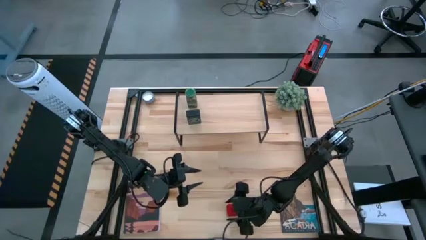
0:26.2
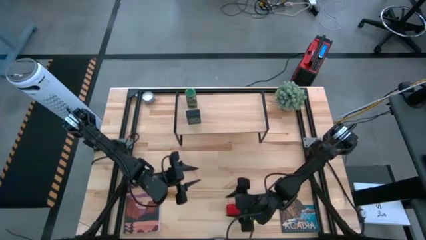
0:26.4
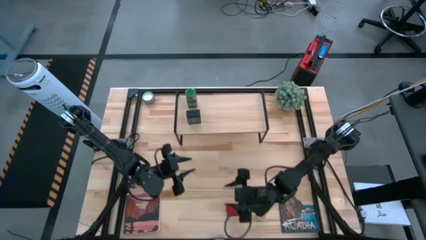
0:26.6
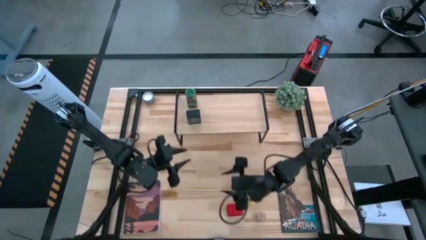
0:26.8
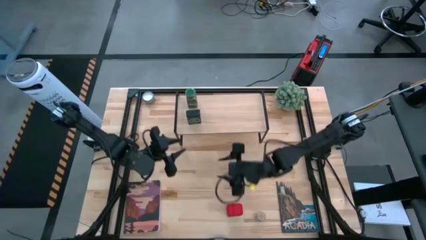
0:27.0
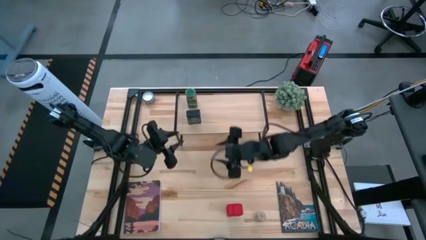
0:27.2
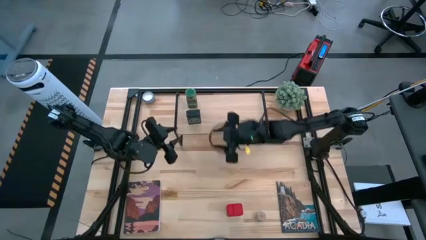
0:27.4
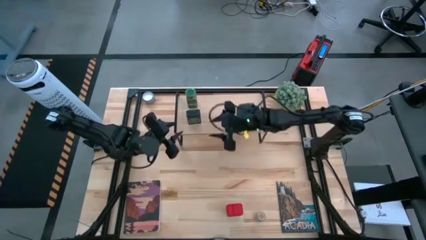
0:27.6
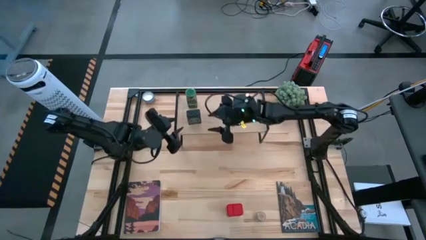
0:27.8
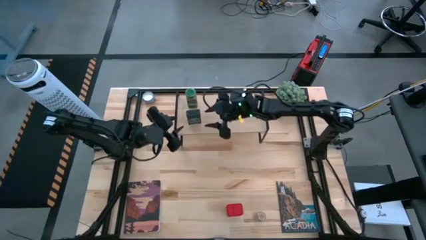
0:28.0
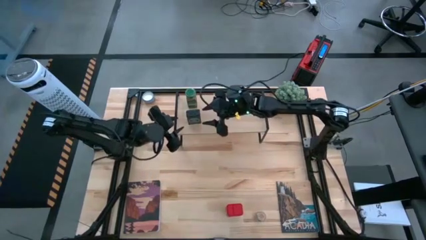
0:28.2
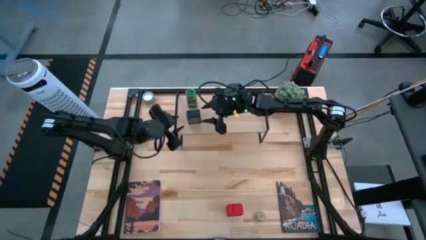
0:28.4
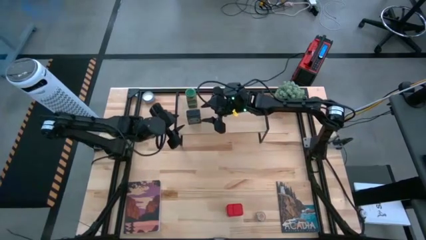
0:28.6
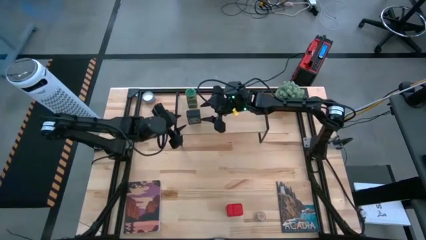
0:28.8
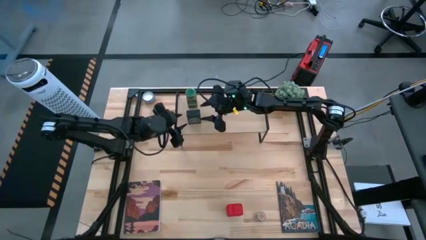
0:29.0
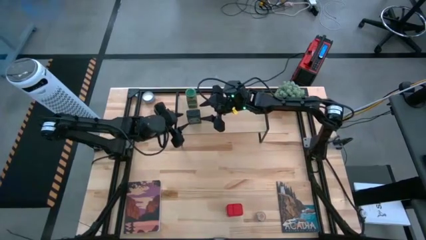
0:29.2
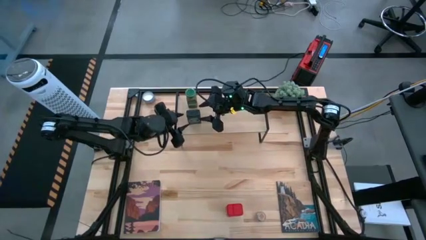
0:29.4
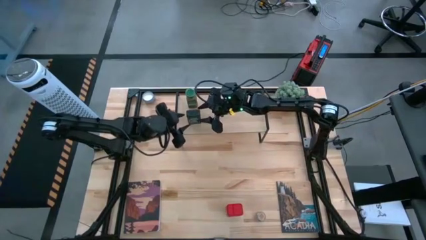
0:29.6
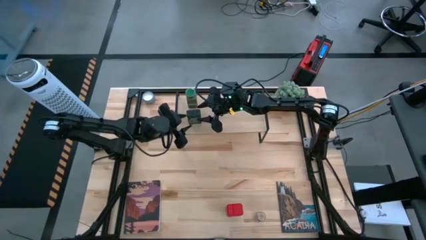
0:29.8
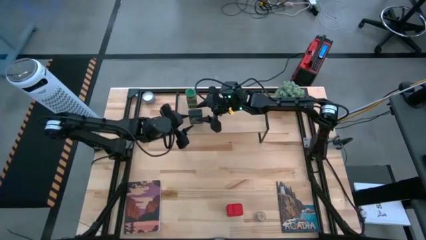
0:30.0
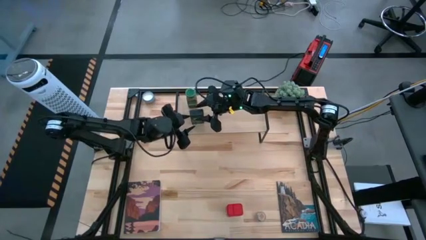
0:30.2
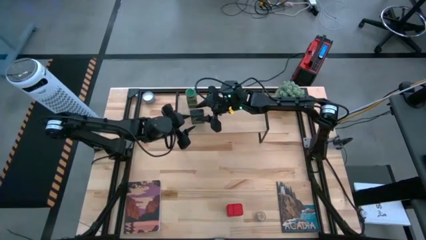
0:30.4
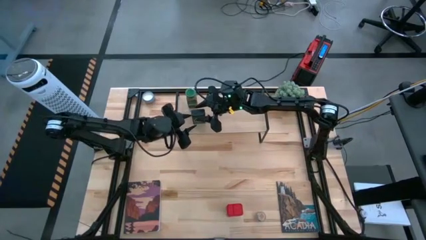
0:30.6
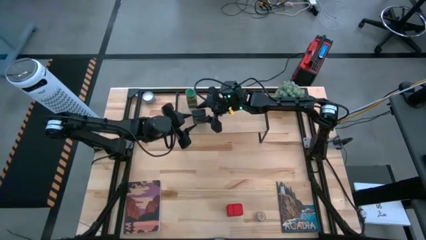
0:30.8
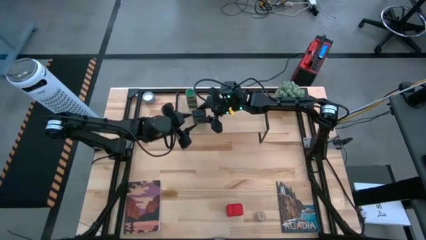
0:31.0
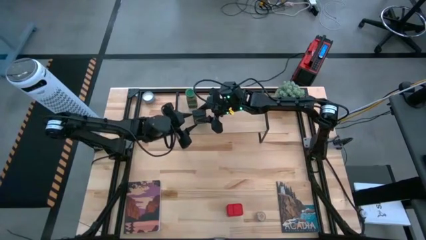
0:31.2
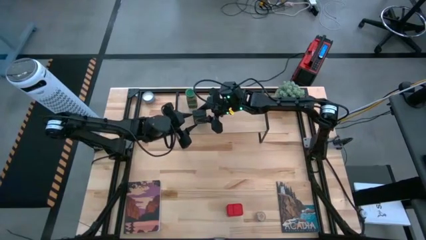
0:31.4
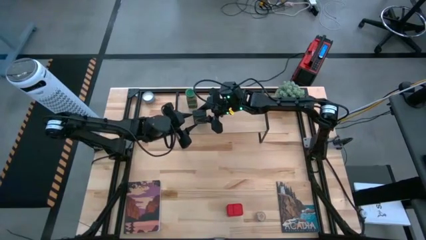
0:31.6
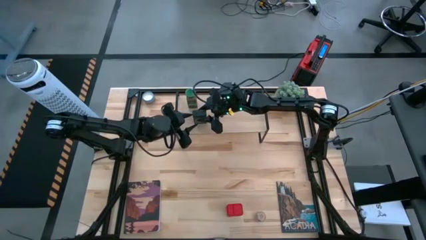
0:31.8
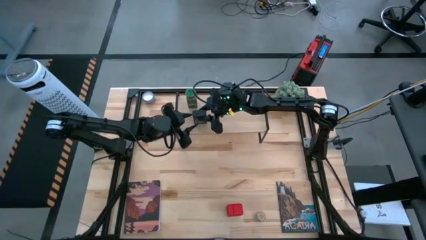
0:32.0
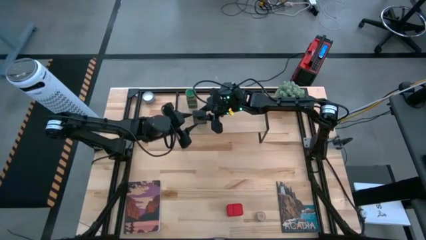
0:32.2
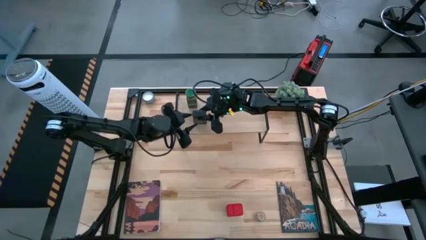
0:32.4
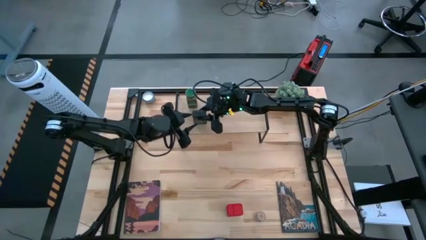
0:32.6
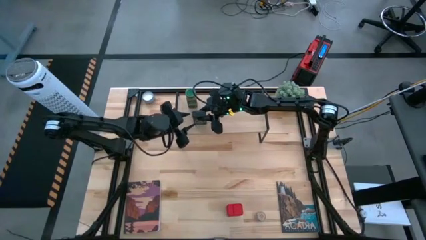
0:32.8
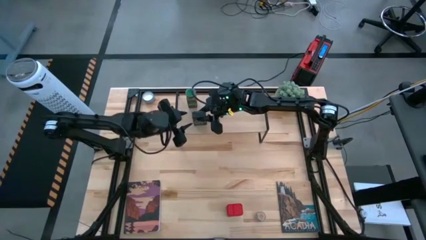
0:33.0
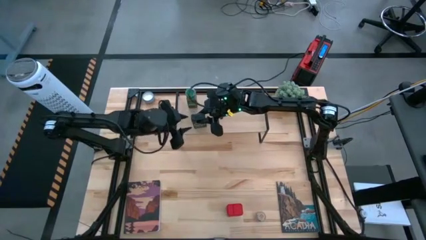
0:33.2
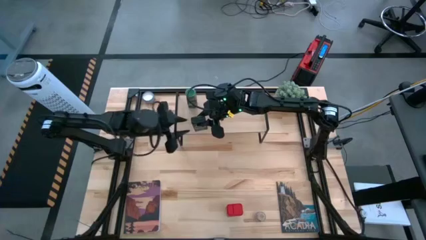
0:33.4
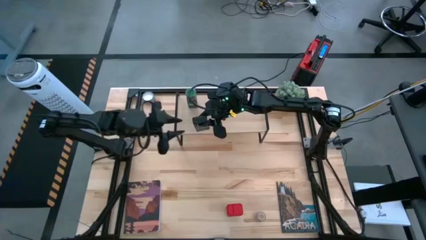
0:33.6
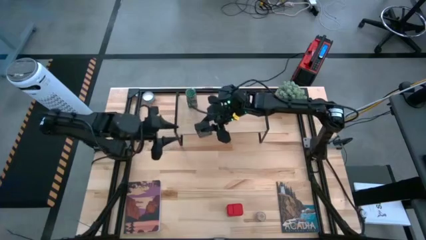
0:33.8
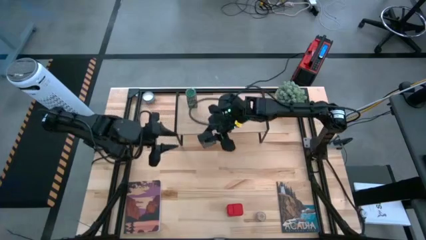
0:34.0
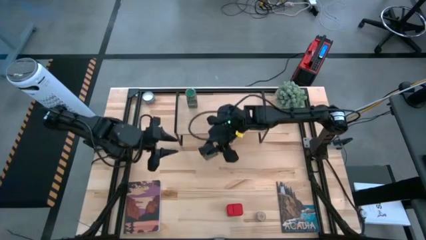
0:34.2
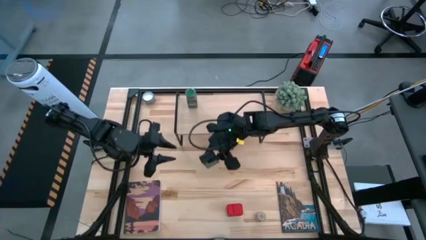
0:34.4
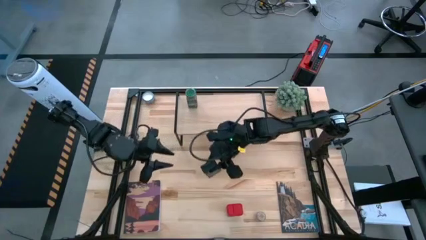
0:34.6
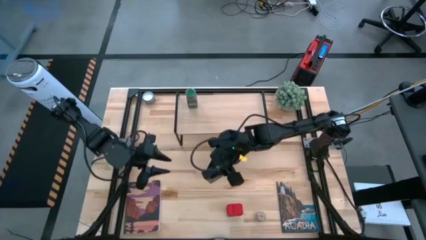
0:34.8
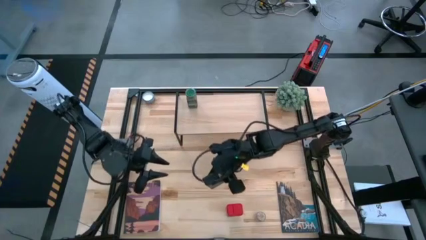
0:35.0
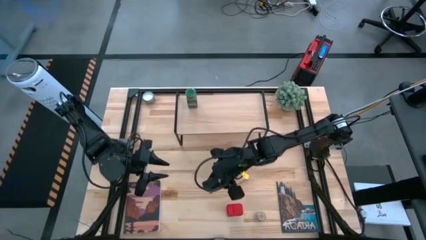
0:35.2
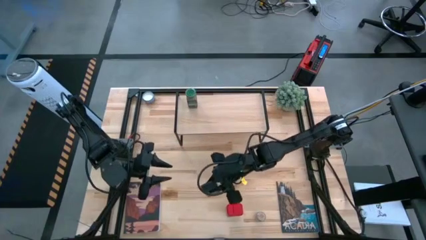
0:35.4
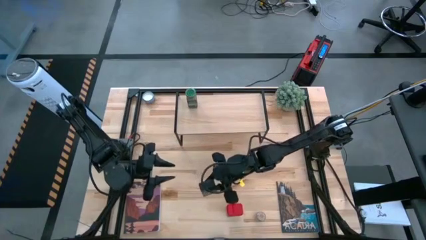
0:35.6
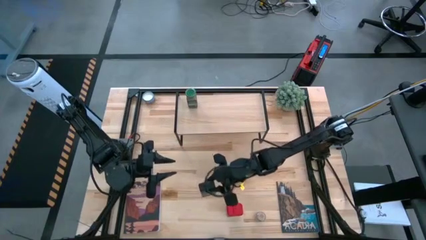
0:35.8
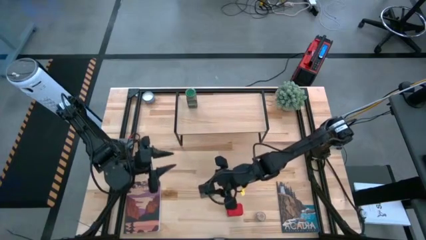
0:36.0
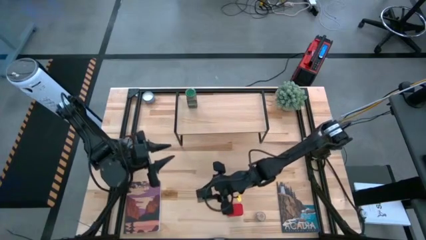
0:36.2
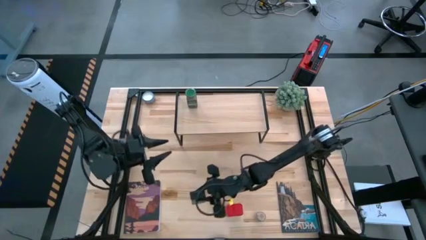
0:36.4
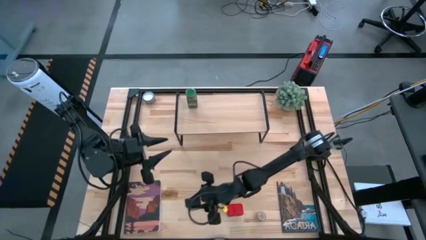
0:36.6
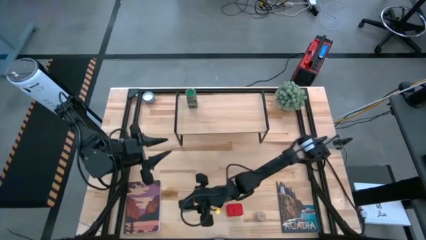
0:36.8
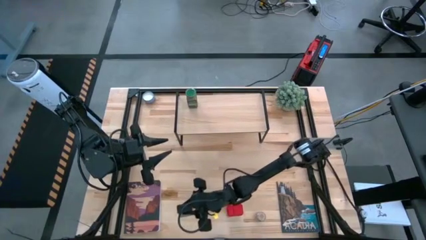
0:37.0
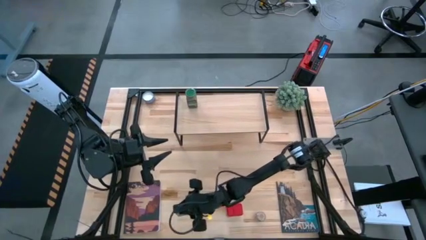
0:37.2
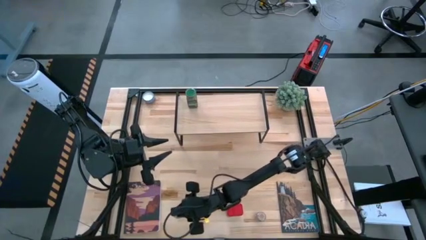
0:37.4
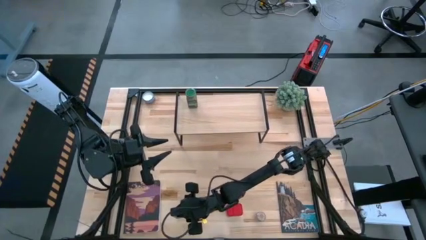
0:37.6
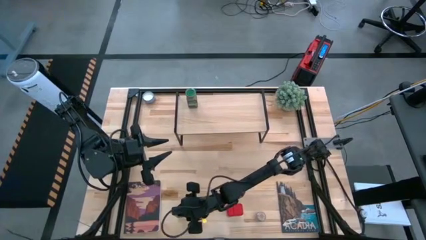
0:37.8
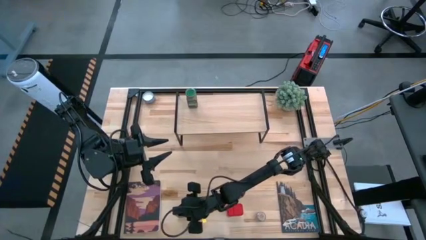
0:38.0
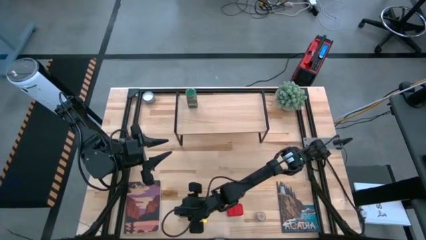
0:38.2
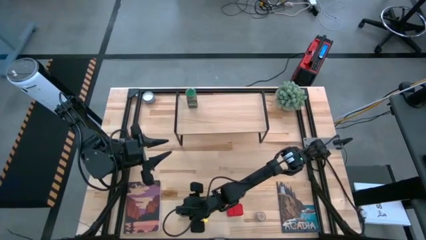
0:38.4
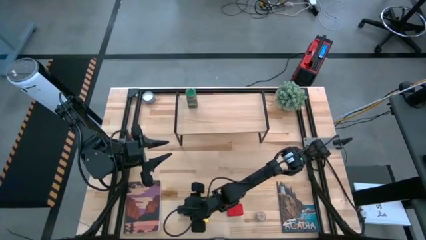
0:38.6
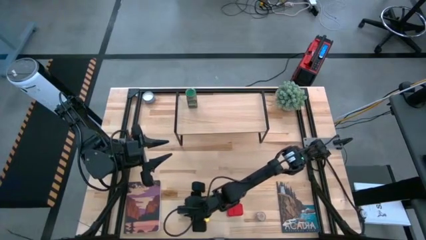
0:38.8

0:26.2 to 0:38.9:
Task: Shelf spices
Remove the black seasoning can from the shelf

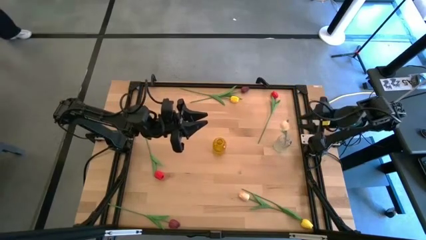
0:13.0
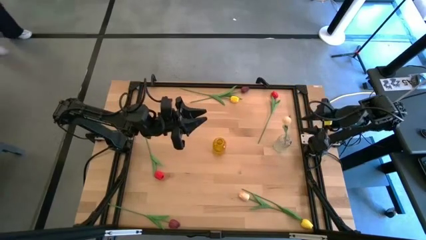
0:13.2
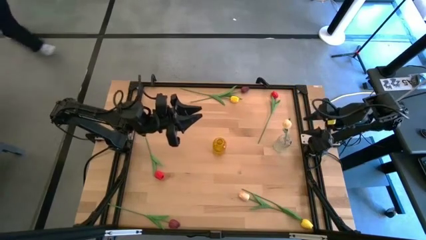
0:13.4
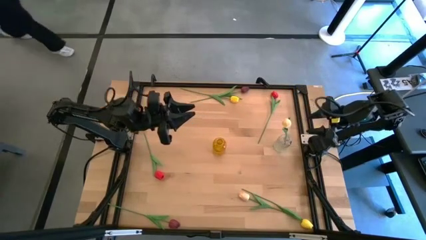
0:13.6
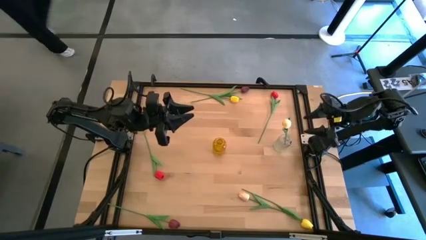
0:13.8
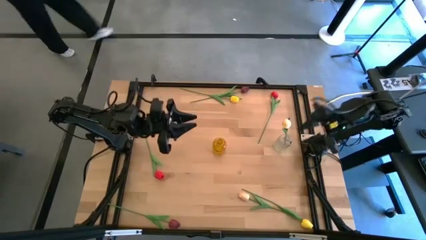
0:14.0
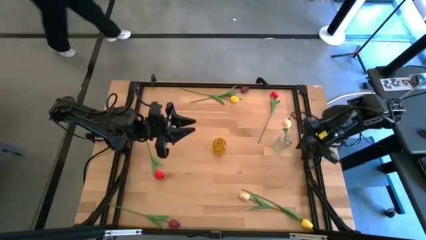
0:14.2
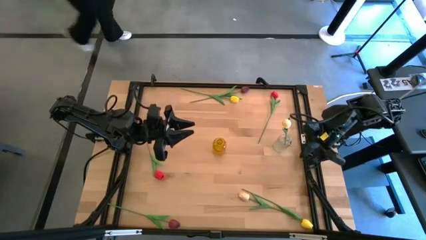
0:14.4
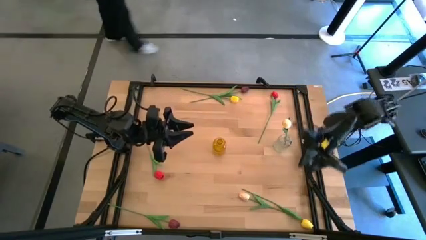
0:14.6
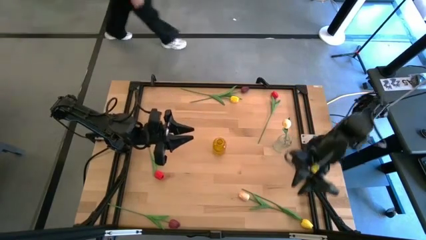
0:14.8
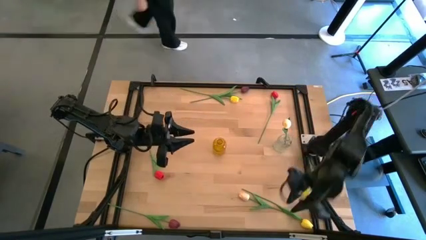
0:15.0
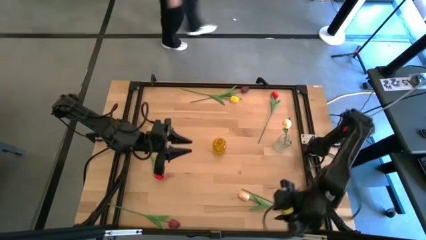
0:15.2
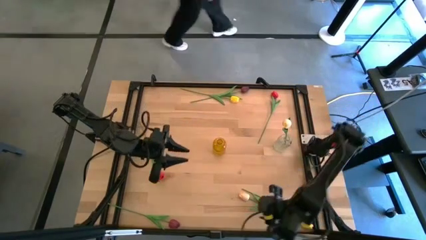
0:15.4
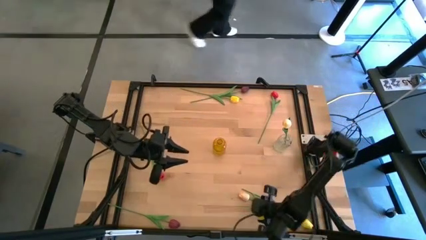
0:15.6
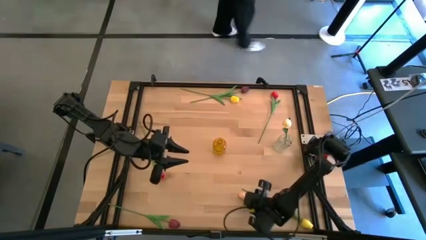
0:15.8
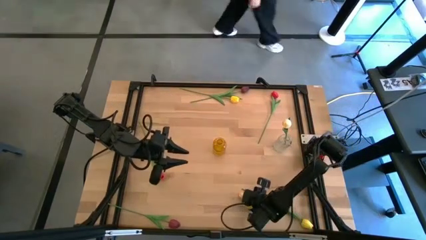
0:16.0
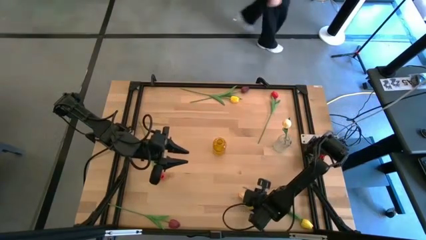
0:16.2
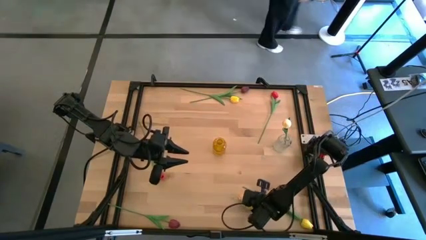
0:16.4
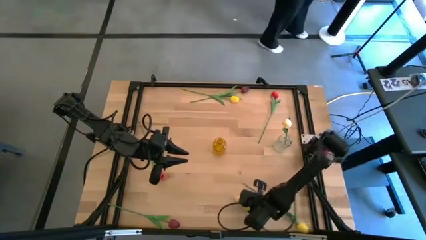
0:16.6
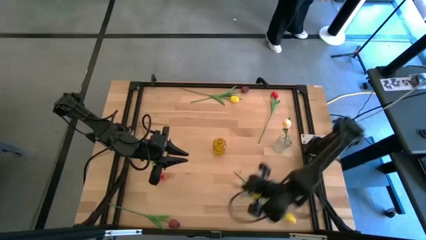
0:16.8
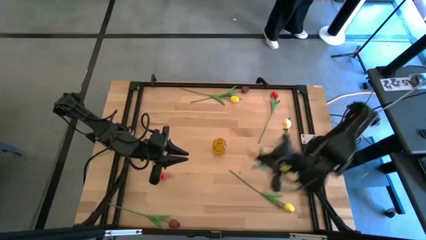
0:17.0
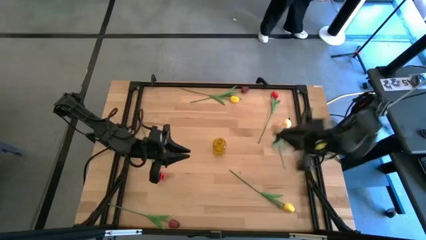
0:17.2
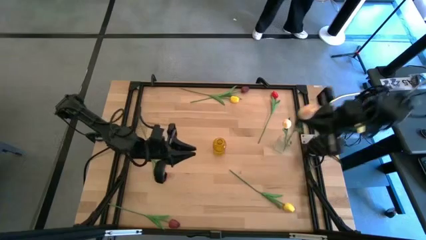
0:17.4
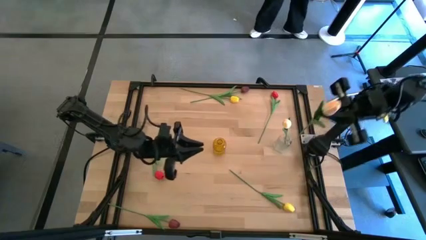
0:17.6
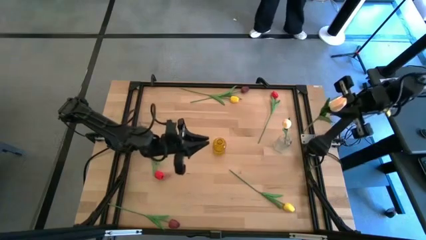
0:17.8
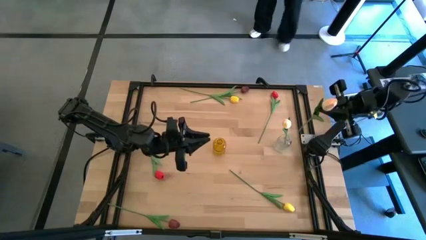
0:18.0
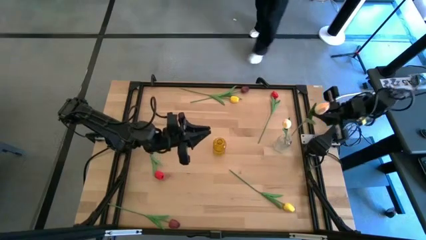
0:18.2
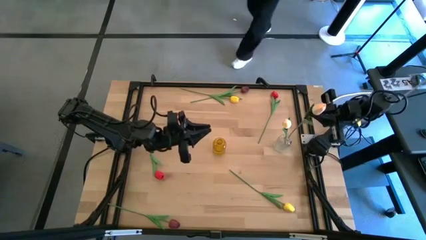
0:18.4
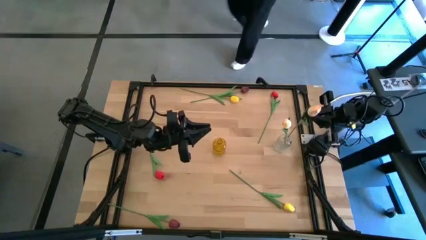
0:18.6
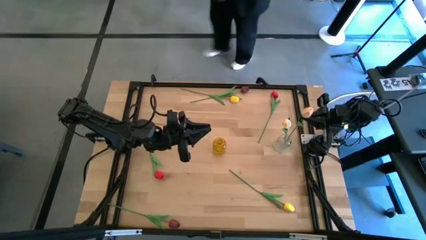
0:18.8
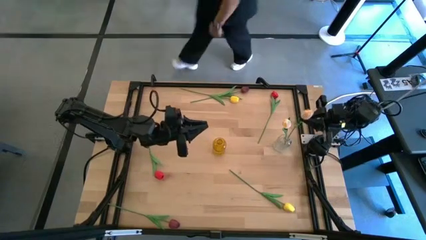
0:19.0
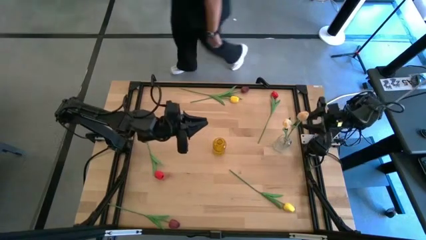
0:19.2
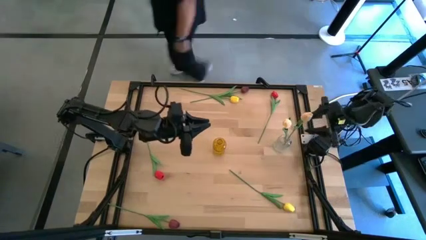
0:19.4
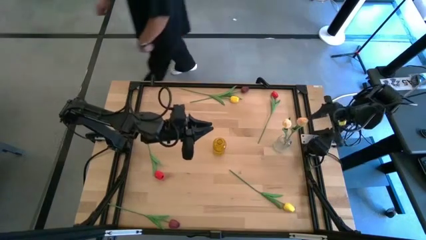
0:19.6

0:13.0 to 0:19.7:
Task: Sort flowers into vase by color
Put the white tulip into the transparent vase
